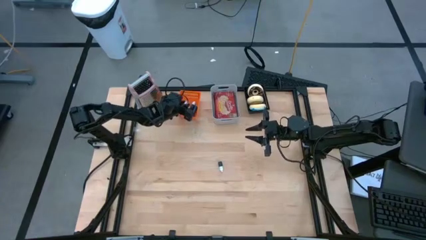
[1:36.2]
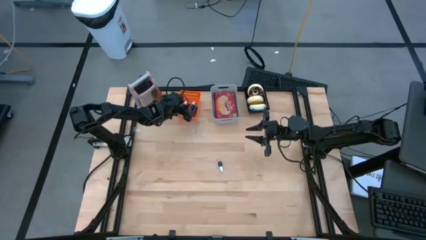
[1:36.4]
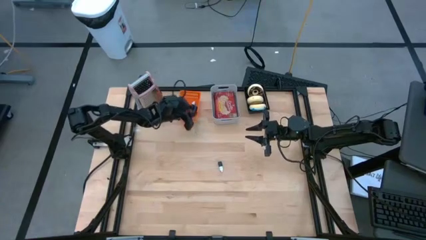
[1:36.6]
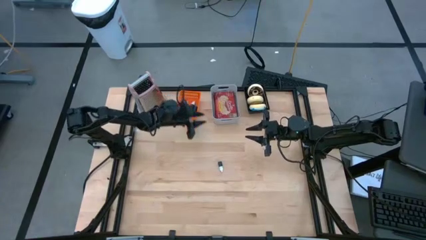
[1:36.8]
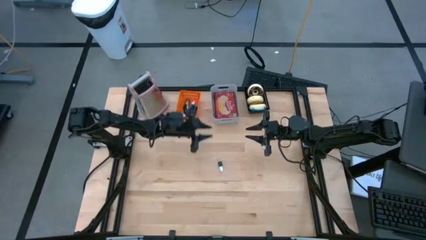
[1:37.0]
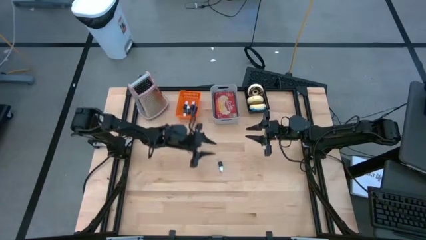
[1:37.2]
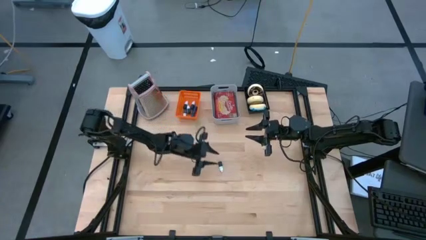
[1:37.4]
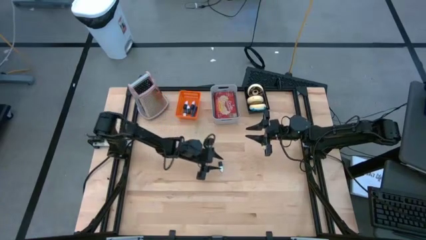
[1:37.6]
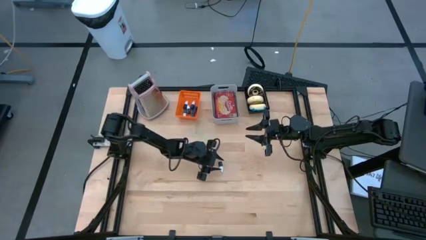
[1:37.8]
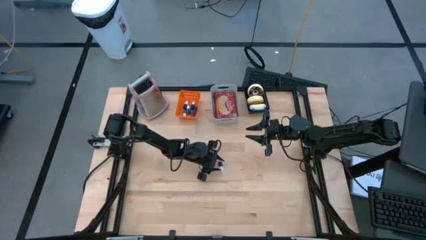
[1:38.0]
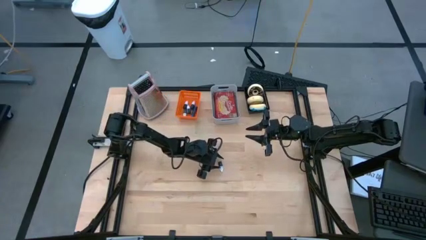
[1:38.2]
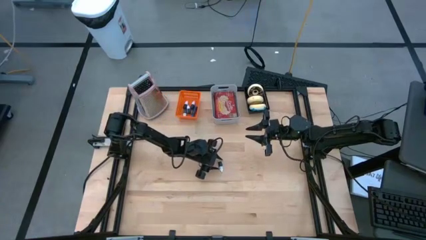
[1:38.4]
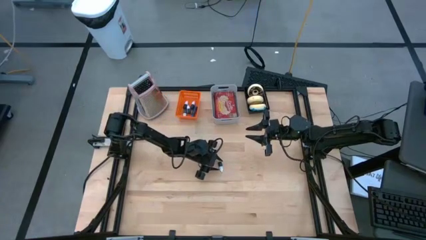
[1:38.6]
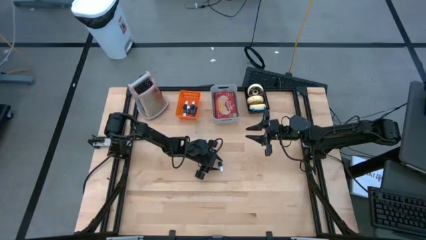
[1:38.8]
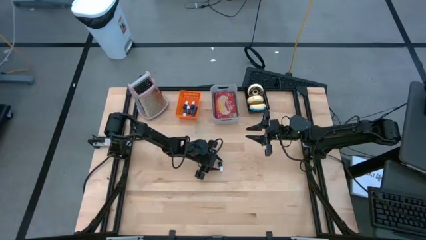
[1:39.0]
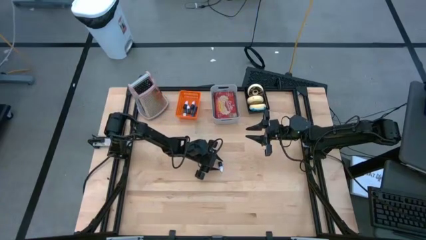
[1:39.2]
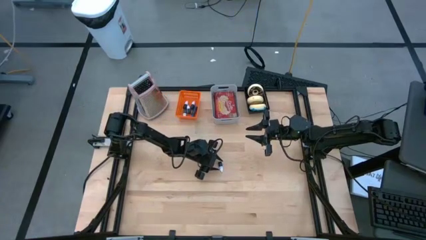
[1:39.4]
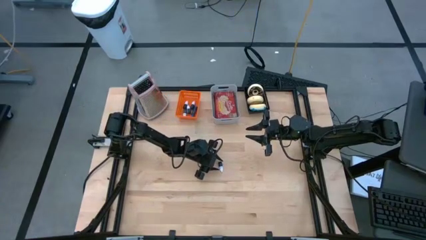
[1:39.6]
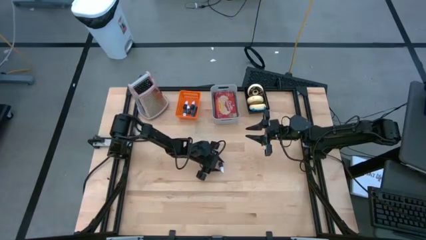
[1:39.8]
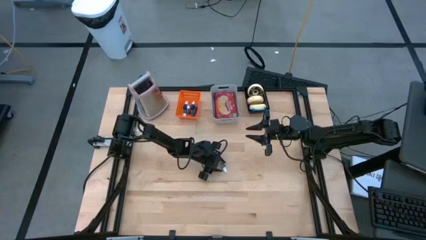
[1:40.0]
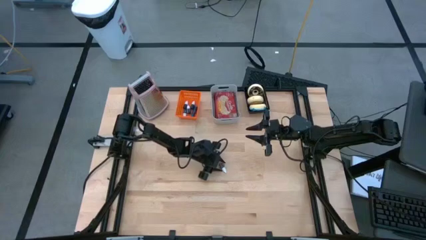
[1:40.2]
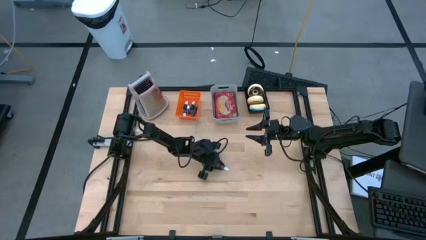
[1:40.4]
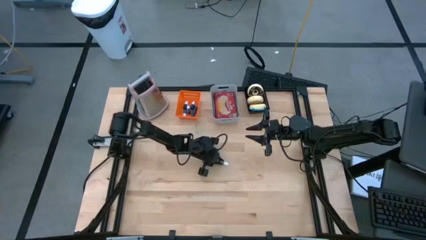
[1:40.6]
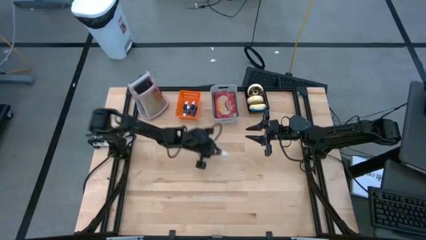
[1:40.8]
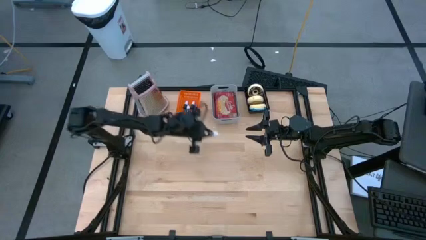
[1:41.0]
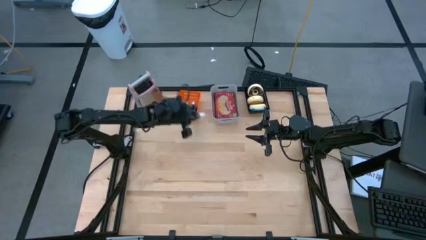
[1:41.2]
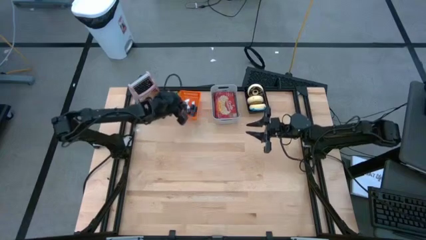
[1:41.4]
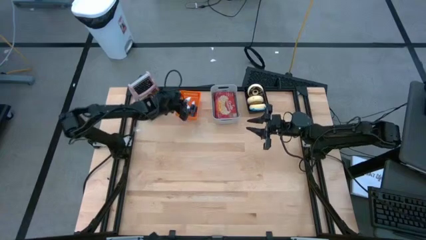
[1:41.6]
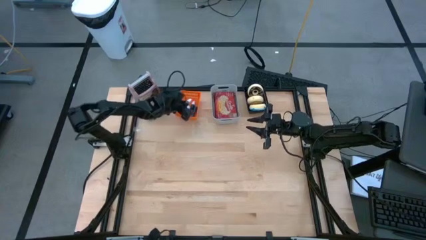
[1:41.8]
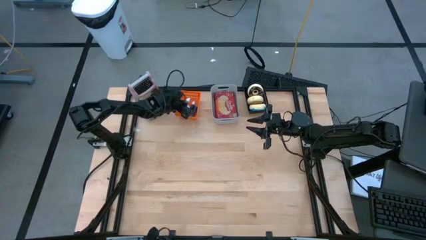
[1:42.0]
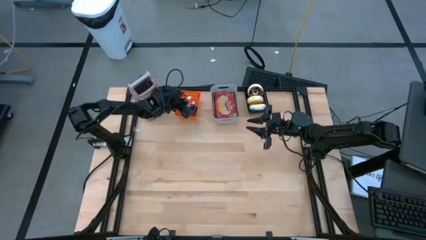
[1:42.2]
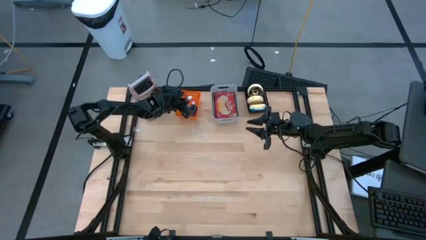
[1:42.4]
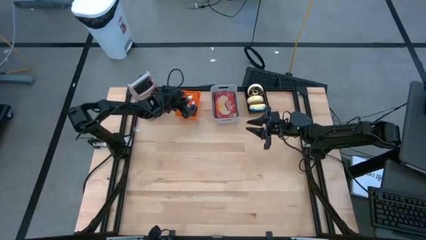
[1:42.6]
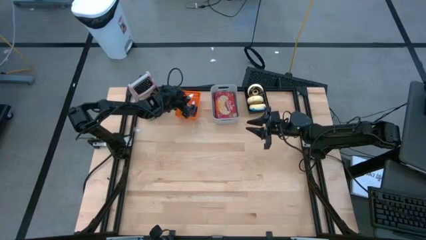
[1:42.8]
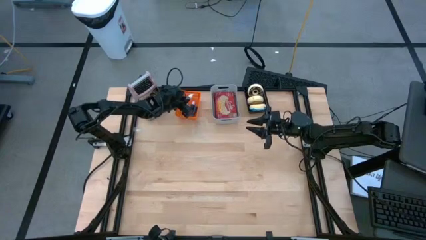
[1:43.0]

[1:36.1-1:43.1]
Put the brown food coloring bottle into the orange bin

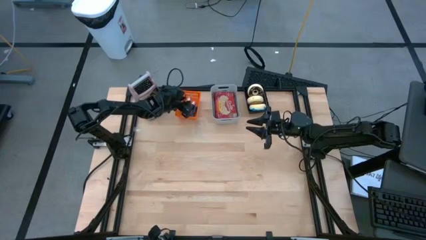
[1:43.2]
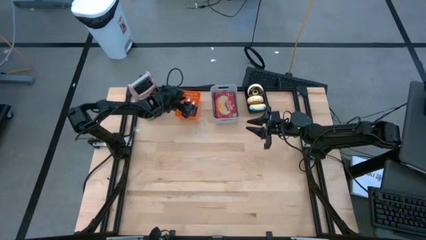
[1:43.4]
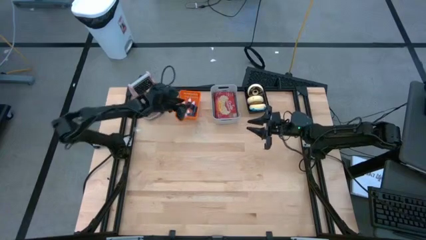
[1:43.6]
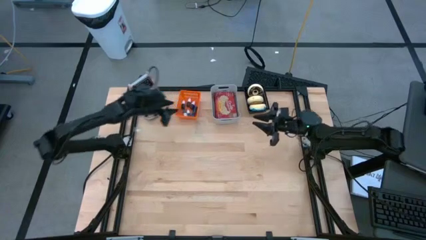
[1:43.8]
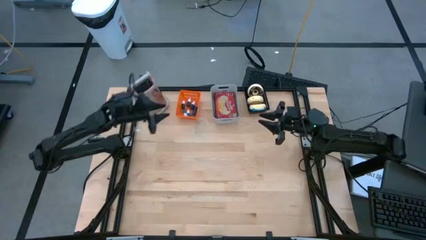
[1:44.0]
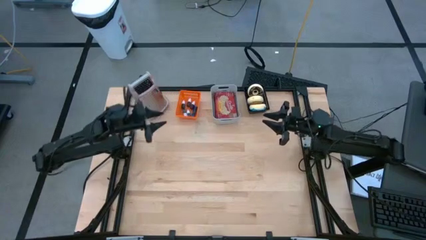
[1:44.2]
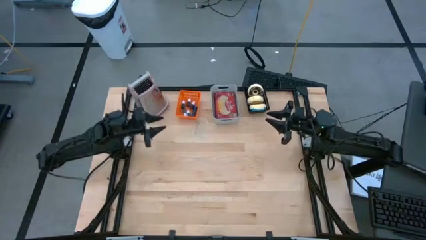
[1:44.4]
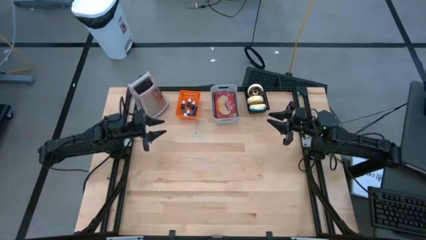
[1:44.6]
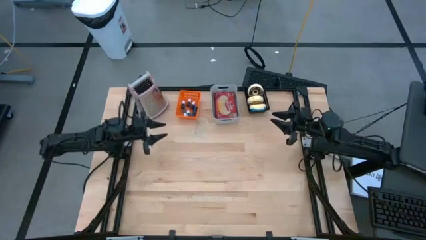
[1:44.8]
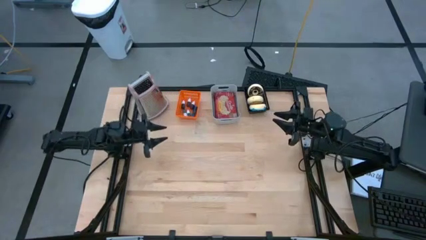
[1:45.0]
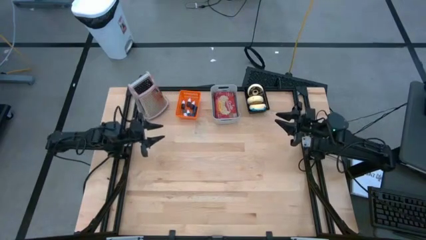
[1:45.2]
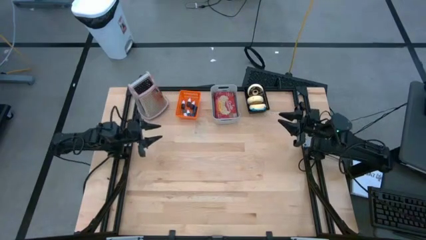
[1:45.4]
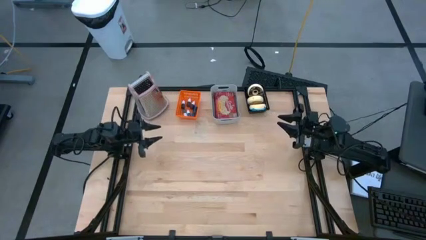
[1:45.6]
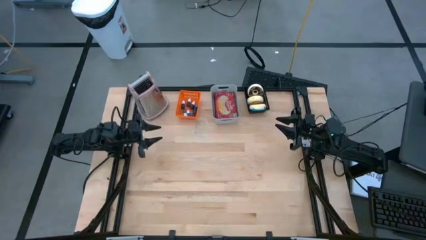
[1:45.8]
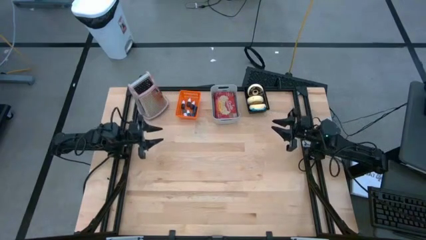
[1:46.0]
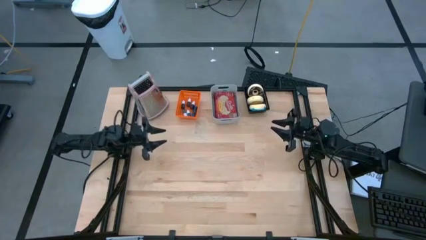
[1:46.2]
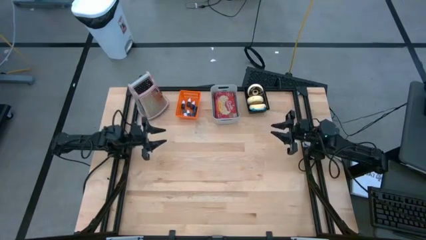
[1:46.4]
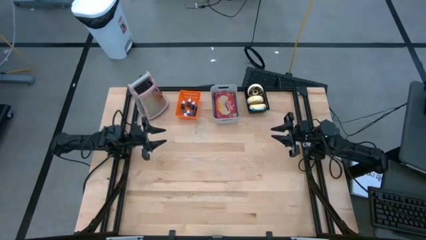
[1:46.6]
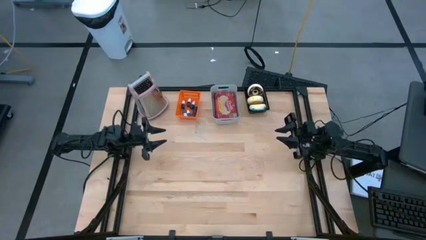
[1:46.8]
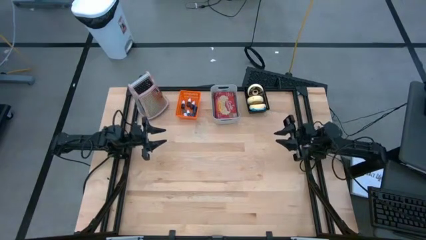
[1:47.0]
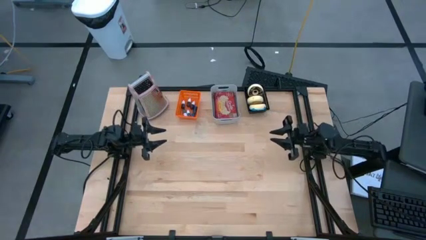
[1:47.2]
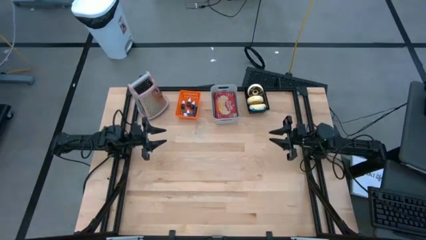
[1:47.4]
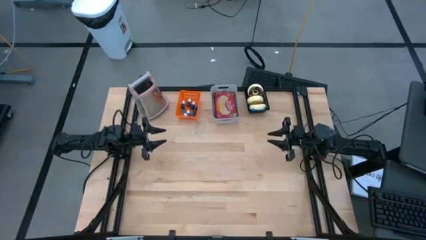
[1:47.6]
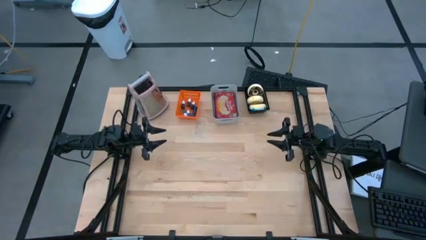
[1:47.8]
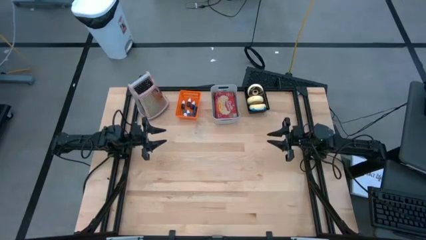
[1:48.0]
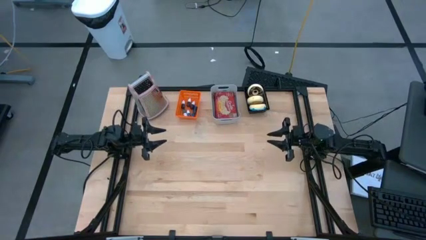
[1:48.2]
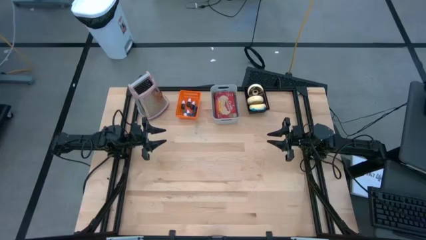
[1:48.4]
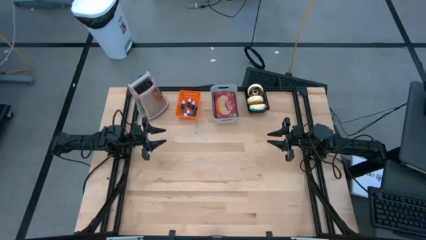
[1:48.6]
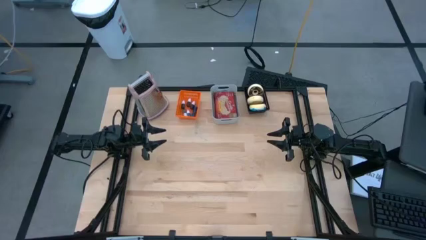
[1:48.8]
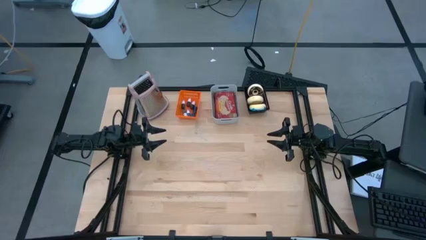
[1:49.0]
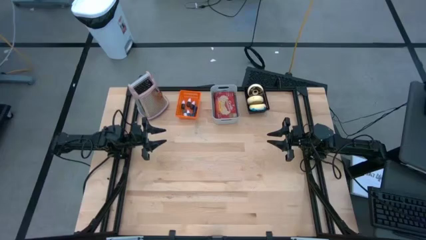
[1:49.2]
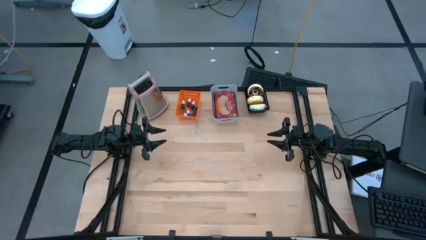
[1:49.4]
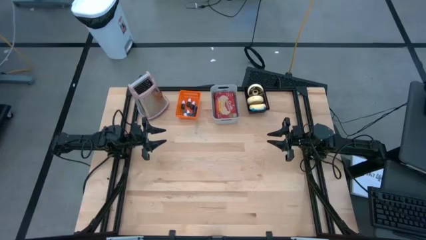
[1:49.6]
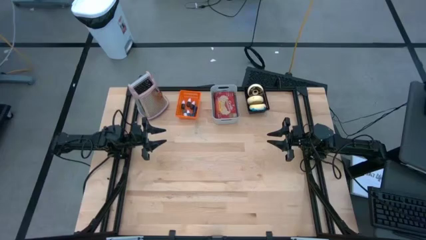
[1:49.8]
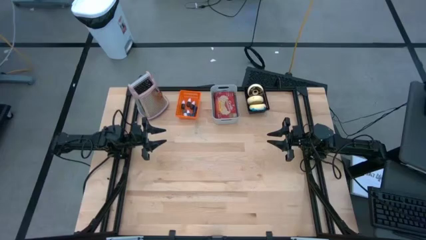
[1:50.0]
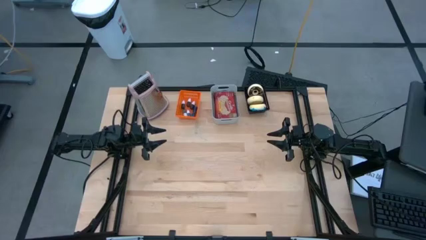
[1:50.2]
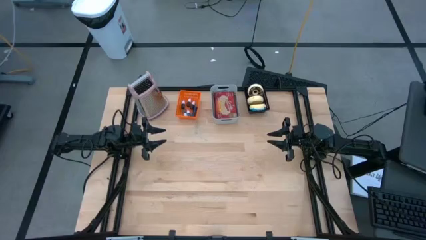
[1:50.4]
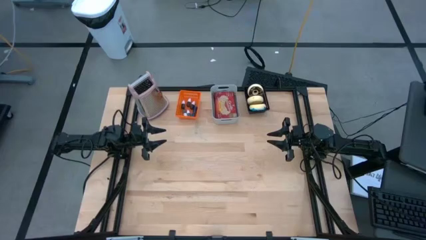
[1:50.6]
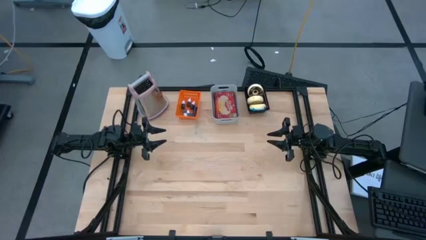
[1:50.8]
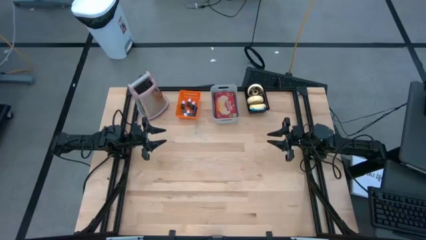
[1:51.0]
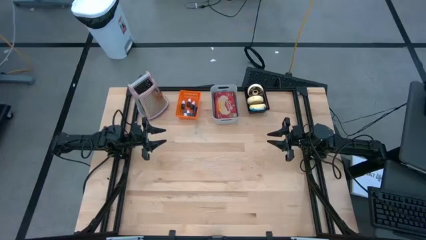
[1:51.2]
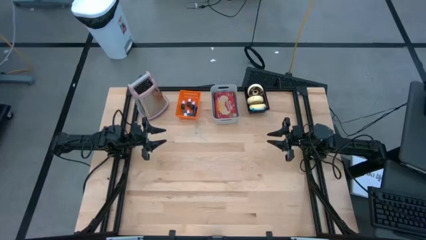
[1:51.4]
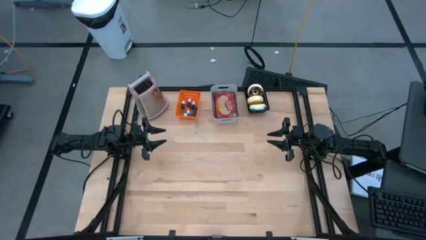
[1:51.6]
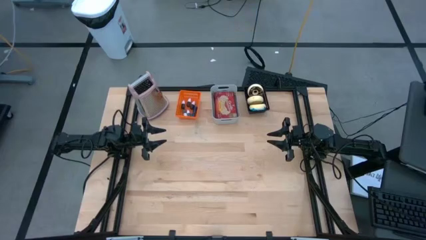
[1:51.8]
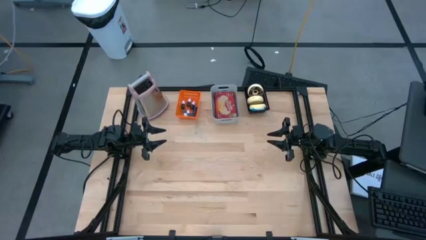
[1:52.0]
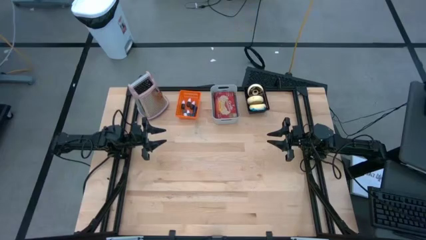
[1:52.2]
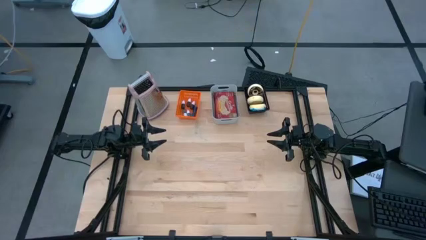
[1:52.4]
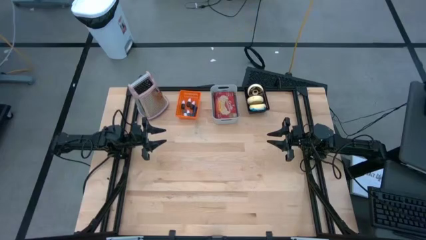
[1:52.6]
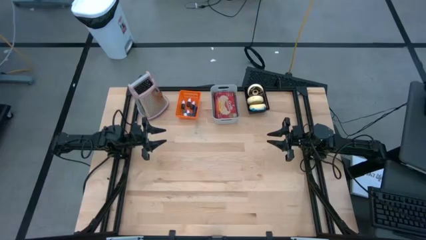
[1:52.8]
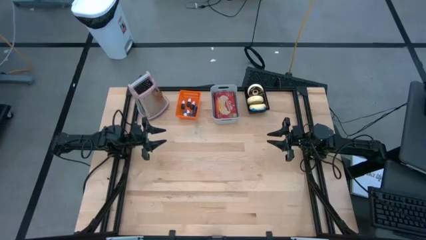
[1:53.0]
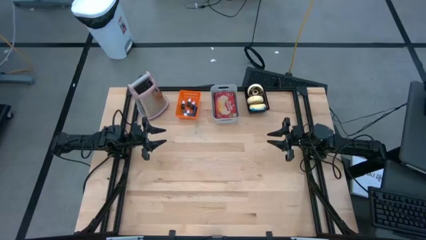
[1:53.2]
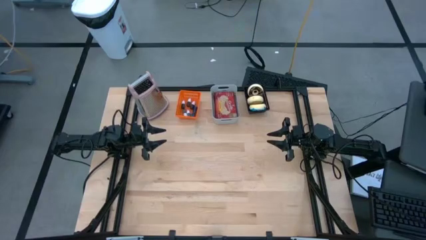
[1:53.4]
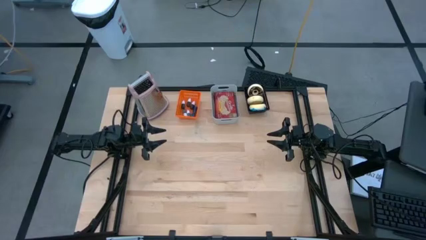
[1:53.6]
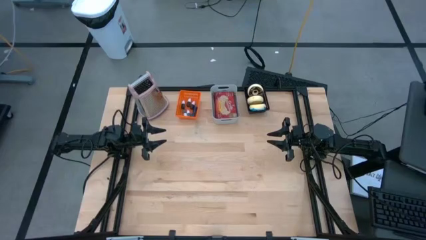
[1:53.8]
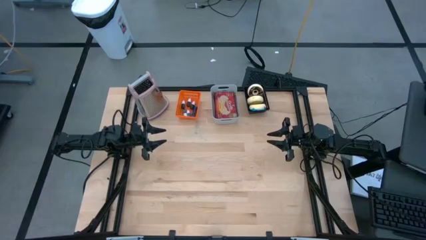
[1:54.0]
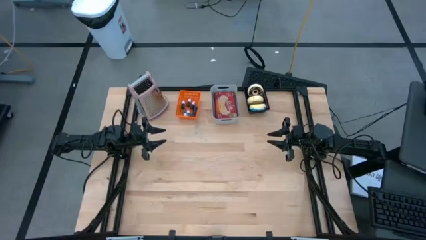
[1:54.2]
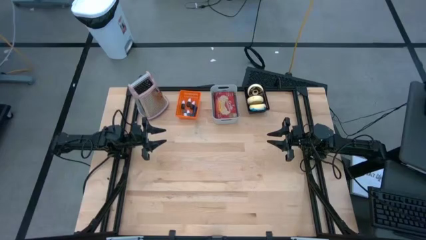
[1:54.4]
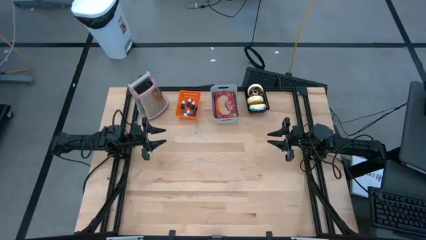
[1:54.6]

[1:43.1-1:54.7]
Return to Home Position
